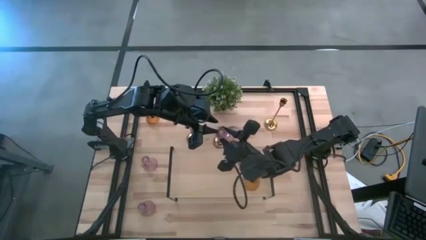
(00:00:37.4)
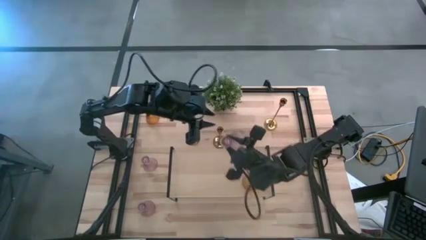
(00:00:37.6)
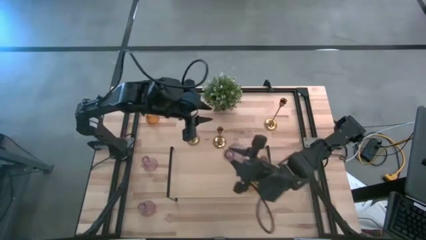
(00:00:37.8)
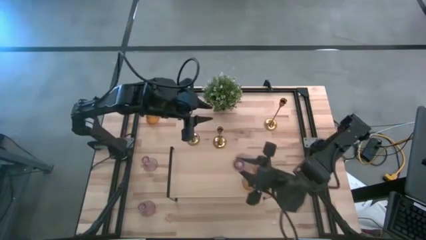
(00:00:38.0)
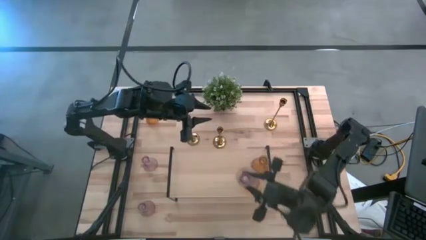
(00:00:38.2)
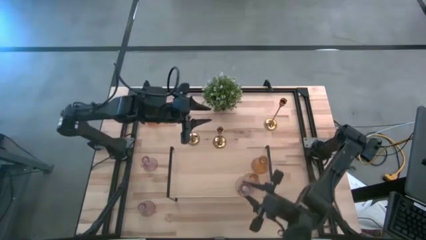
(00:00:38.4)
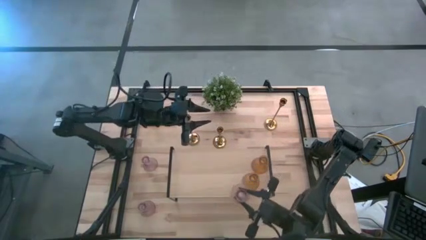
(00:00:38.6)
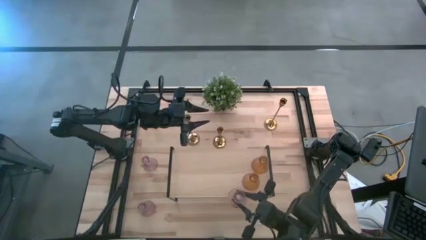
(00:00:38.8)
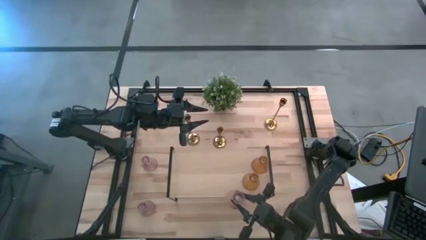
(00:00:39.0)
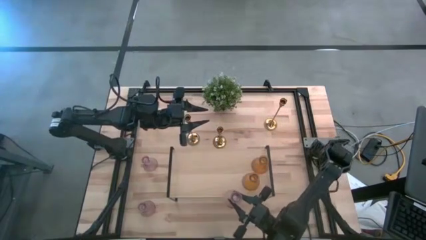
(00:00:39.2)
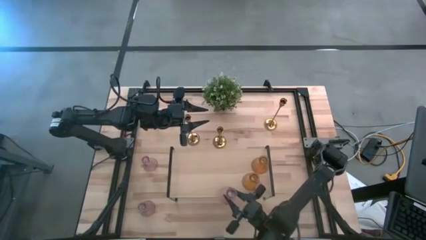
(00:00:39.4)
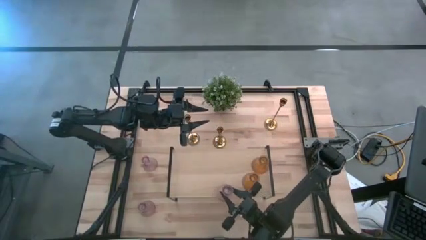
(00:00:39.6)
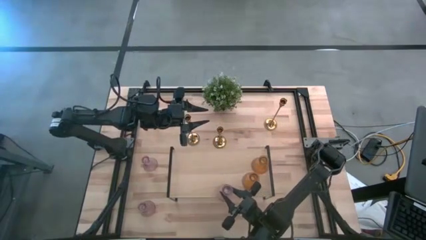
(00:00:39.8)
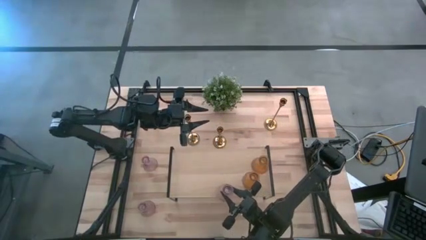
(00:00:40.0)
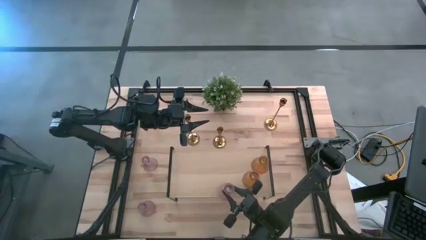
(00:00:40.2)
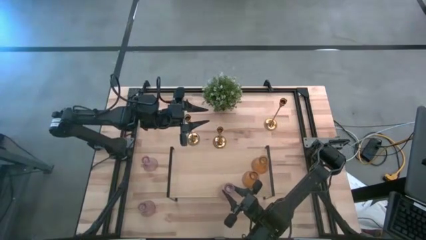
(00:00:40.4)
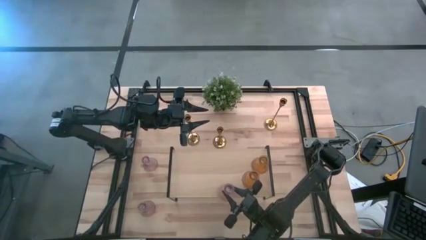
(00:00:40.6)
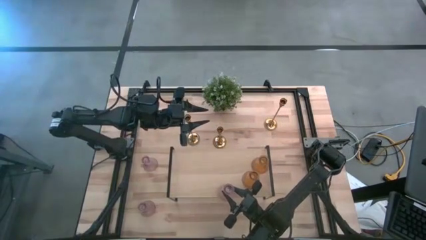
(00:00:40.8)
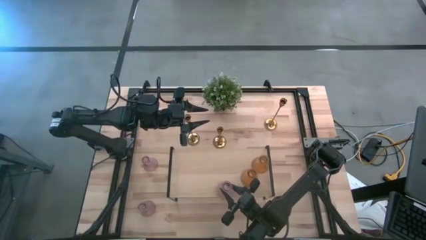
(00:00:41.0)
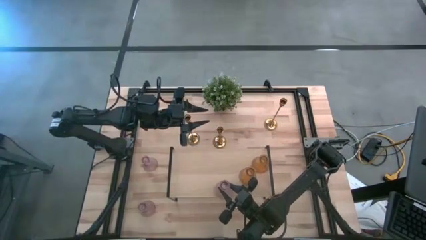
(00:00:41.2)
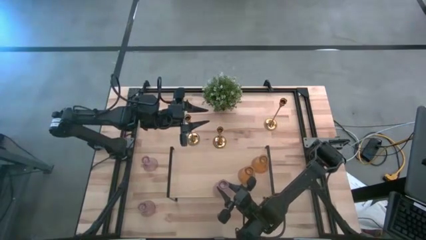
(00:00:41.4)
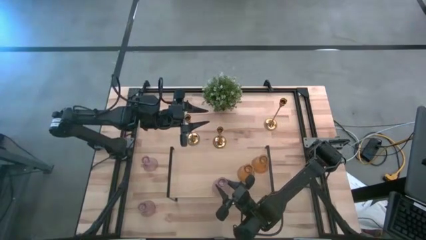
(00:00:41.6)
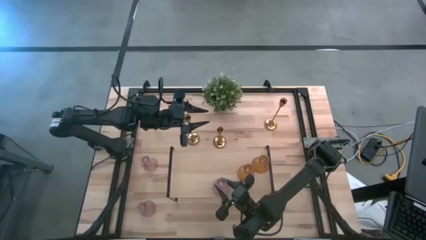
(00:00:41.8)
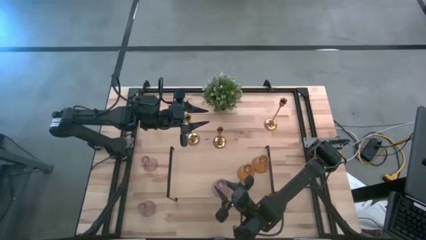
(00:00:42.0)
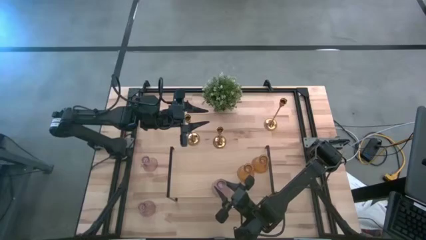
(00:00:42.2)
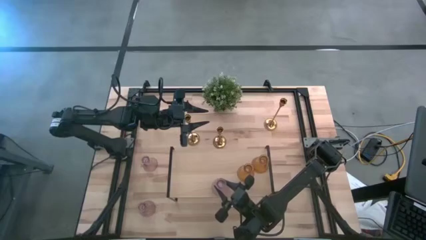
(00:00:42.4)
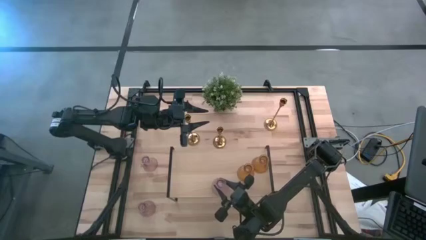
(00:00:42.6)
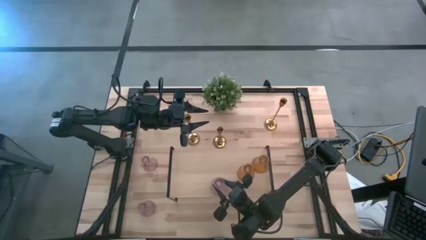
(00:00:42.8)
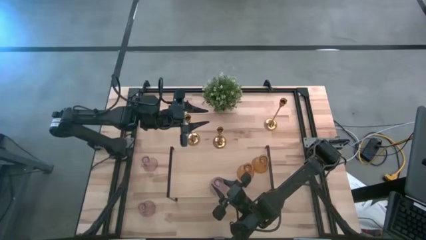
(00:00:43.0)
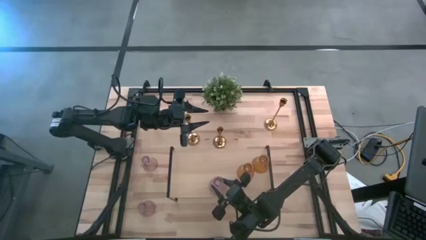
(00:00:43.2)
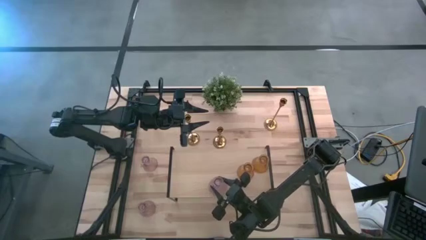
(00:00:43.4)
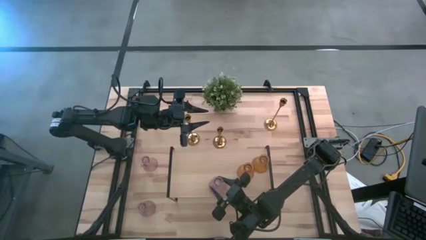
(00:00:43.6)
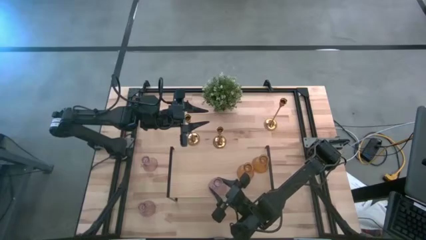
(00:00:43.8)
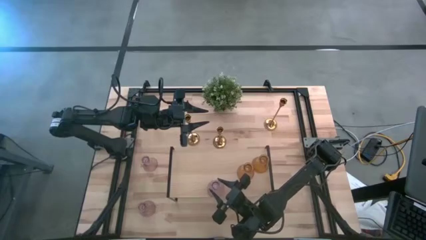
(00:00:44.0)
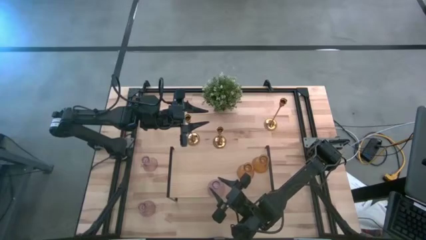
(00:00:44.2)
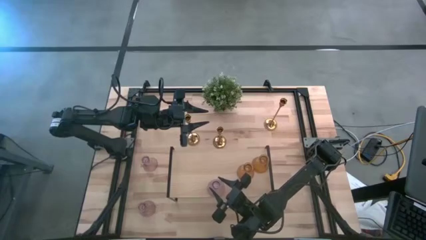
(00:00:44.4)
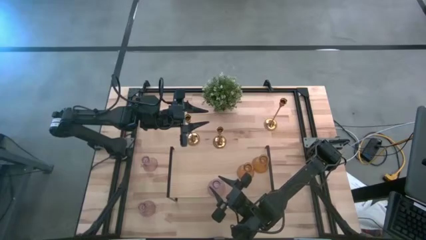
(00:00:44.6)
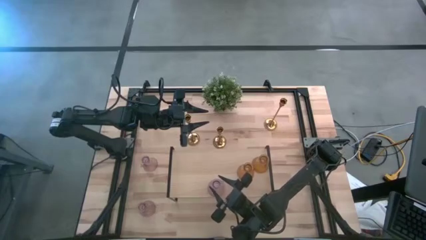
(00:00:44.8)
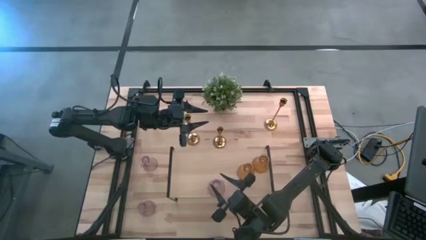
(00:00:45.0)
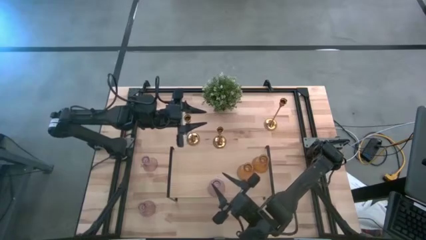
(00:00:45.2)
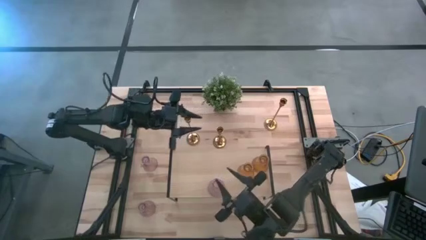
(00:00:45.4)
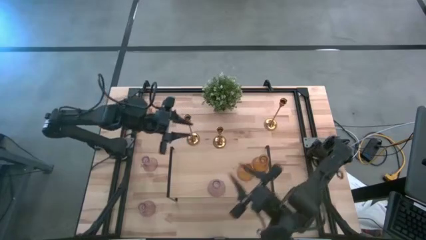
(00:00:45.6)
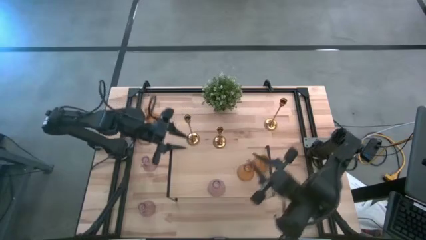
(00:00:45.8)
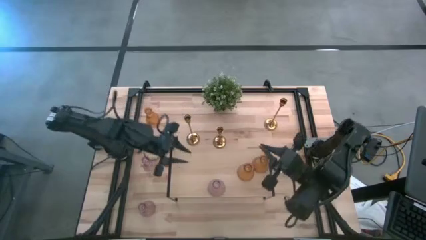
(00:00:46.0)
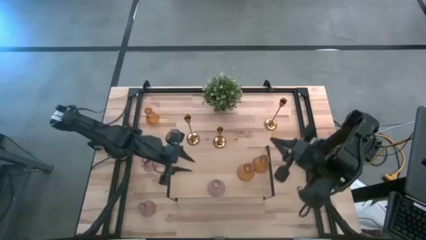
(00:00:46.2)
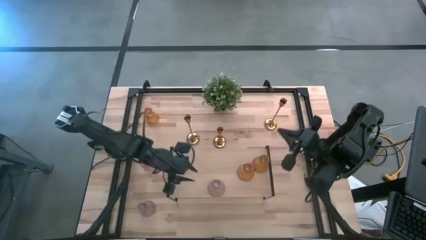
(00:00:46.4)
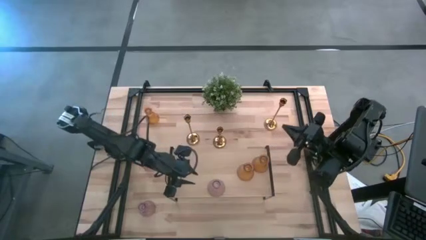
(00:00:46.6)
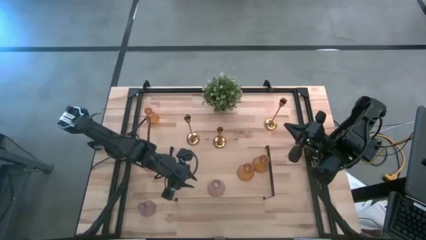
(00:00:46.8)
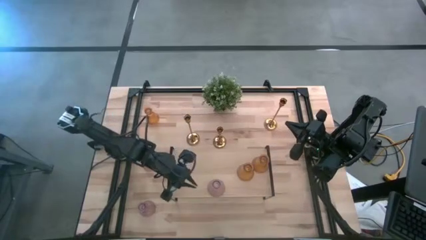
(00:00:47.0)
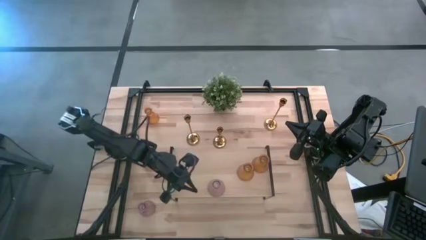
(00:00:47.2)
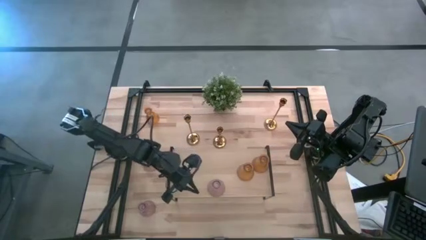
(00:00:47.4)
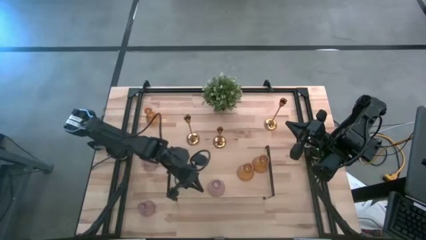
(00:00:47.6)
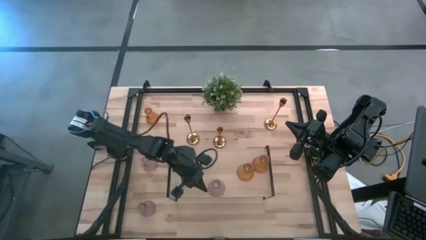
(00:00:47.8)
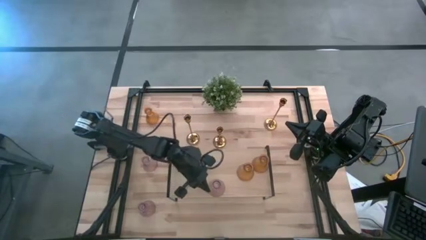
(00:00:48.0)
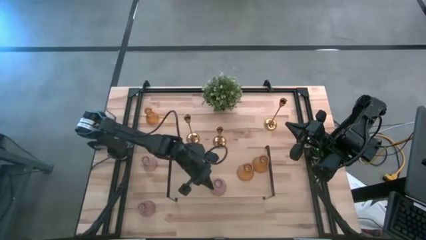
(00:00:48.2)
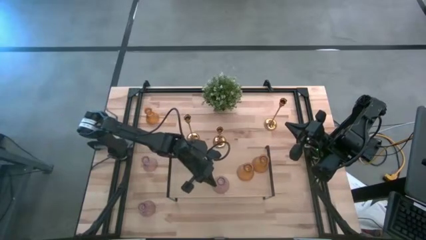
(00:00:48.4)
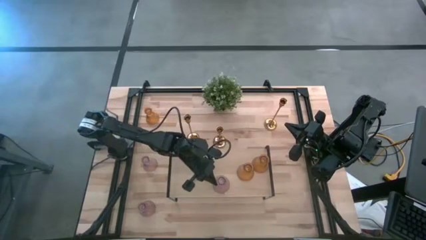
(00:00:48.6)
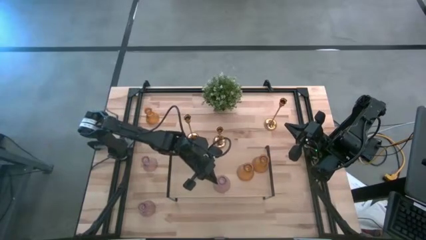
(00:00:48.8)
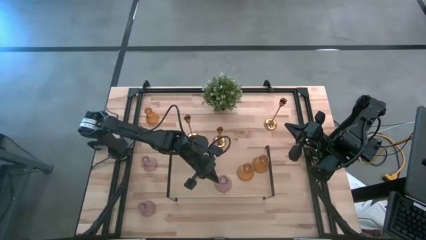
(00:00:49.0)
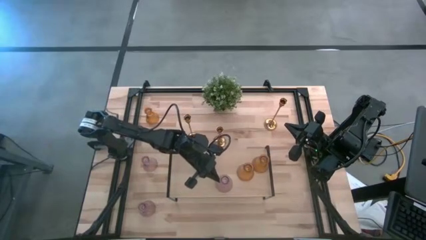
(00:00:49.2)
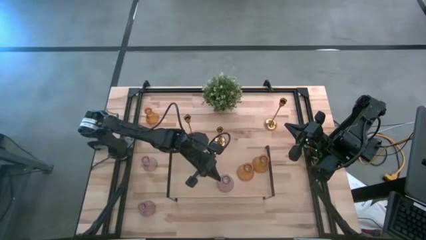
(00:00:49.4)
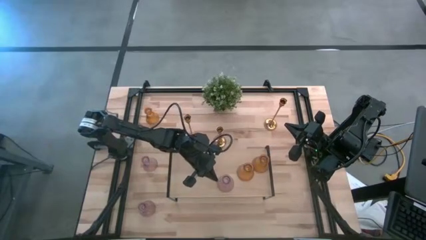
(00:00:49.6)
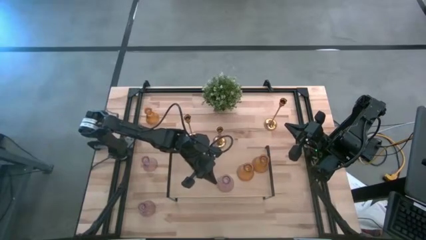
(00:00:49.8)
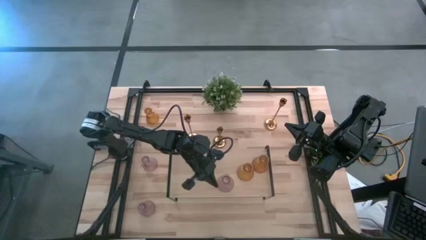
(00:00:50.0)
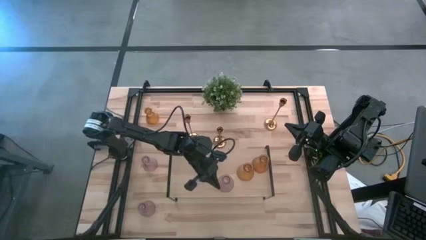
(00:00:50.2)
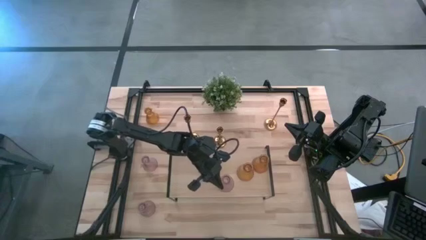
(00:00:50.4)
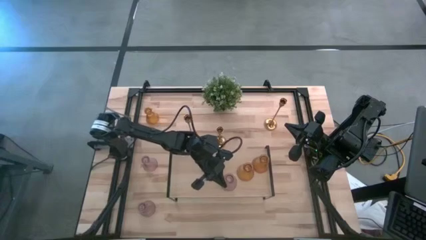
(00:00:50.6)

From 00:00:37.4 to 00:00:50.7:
Task: Pick & Place candle stick holders
Put the top violet candle holder on the shelf
